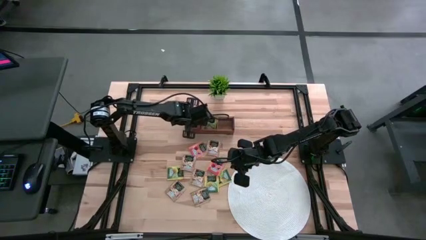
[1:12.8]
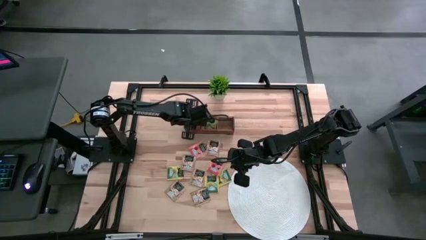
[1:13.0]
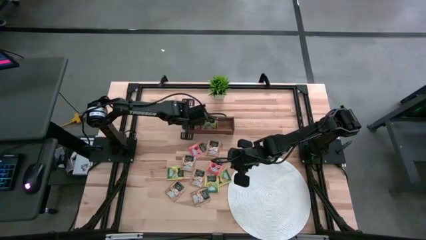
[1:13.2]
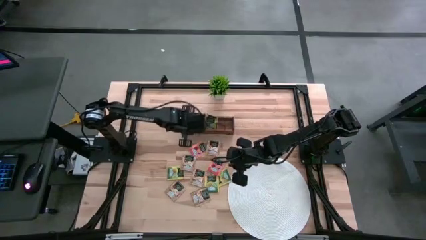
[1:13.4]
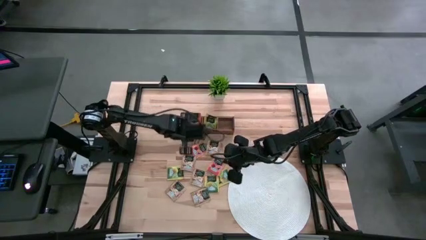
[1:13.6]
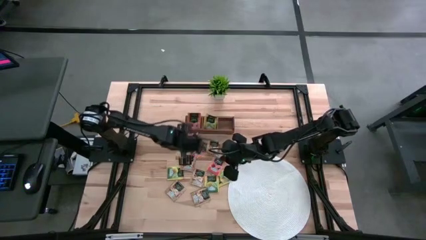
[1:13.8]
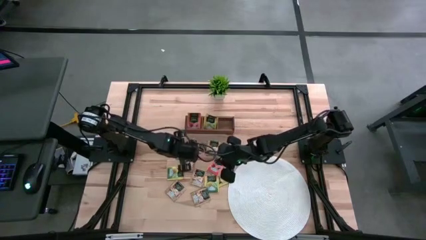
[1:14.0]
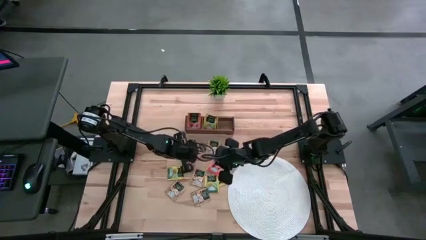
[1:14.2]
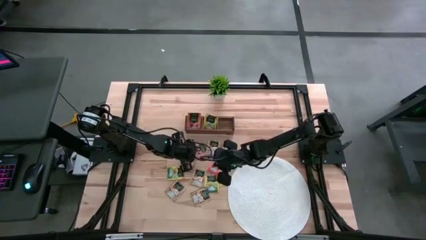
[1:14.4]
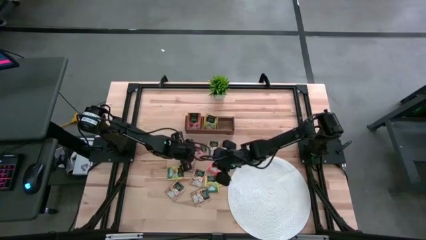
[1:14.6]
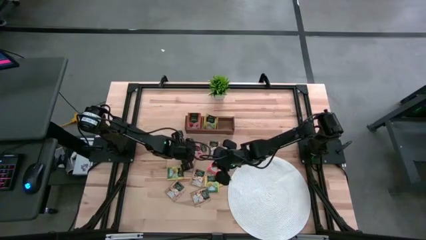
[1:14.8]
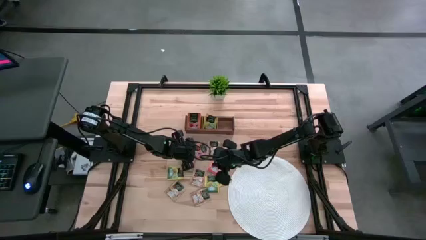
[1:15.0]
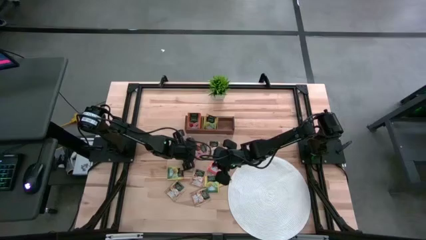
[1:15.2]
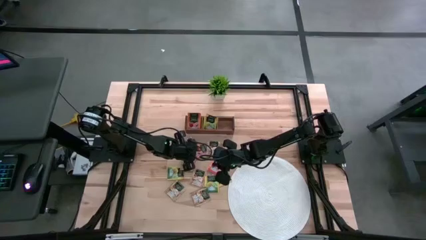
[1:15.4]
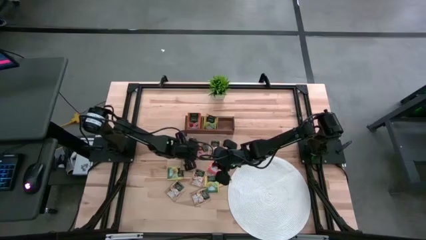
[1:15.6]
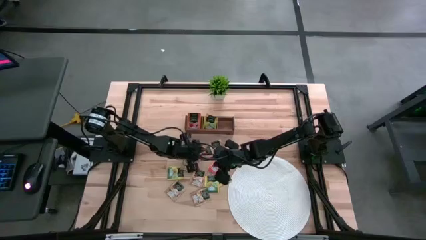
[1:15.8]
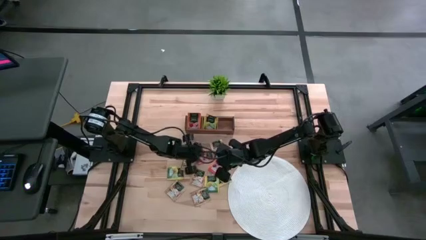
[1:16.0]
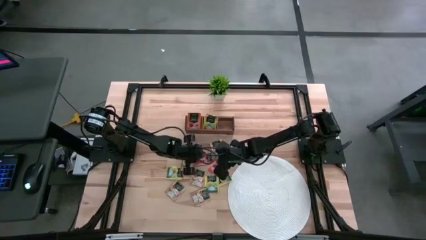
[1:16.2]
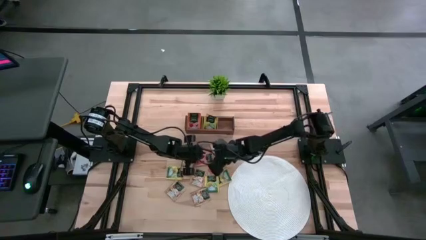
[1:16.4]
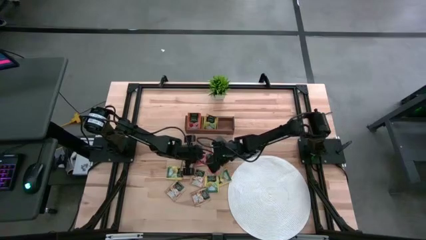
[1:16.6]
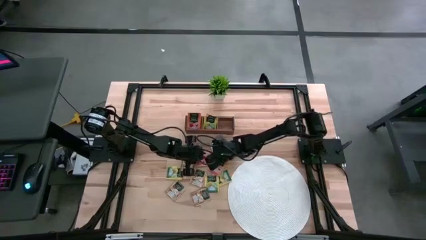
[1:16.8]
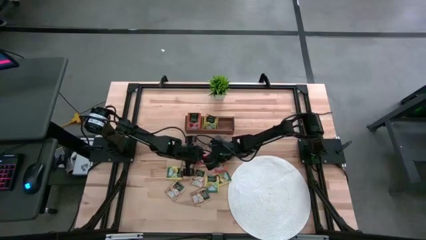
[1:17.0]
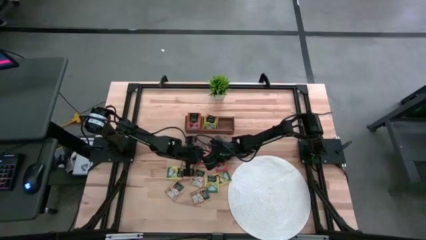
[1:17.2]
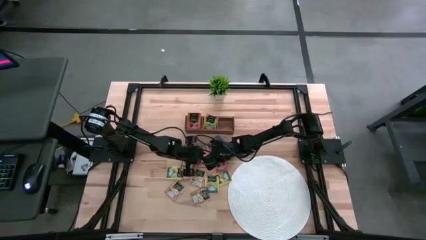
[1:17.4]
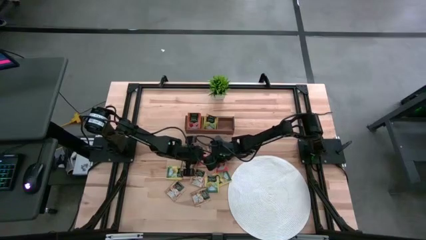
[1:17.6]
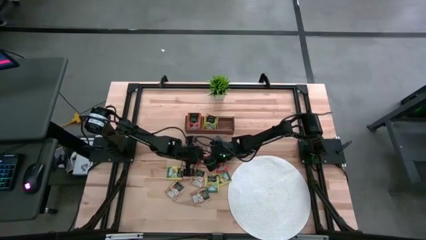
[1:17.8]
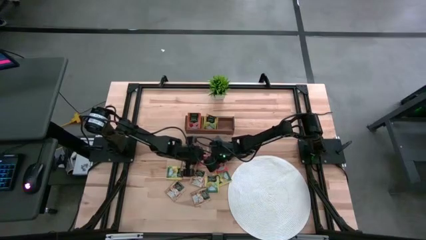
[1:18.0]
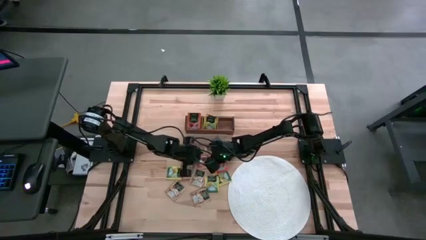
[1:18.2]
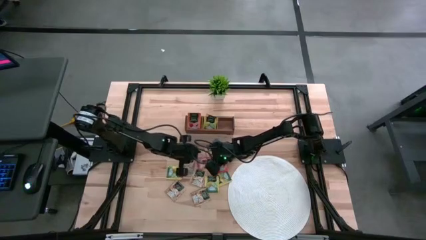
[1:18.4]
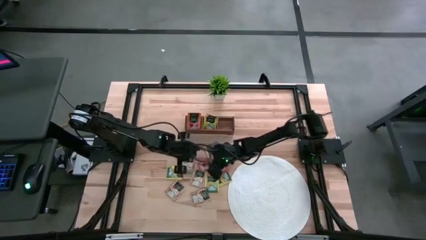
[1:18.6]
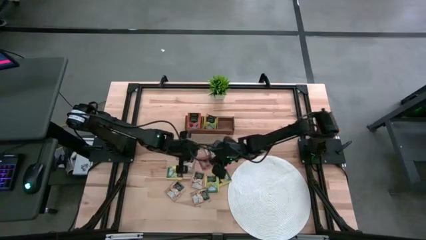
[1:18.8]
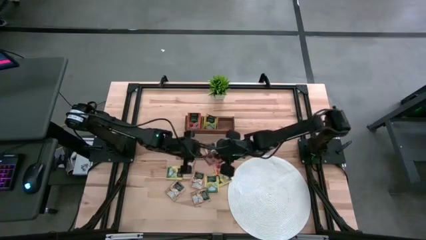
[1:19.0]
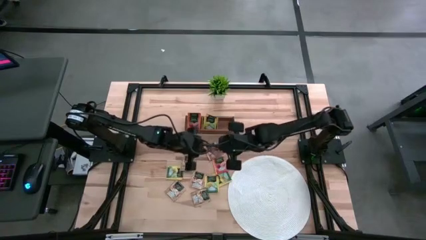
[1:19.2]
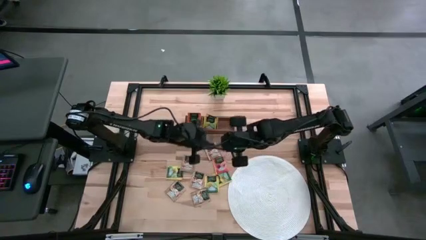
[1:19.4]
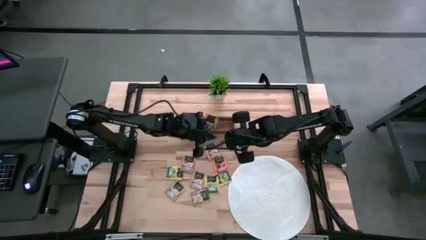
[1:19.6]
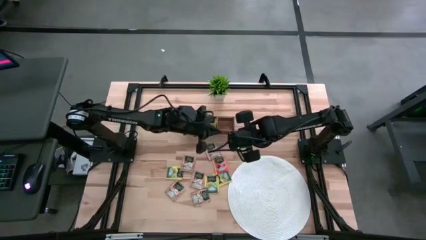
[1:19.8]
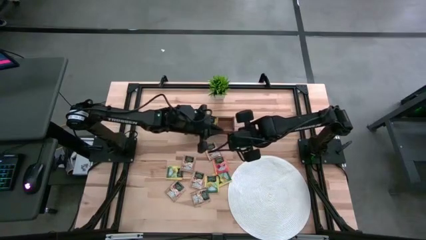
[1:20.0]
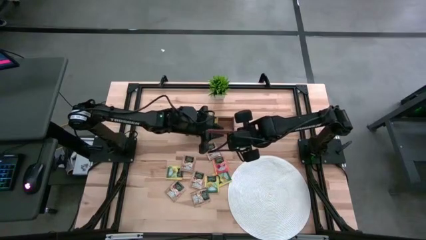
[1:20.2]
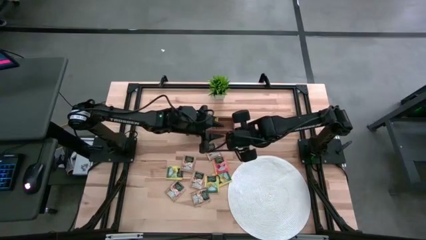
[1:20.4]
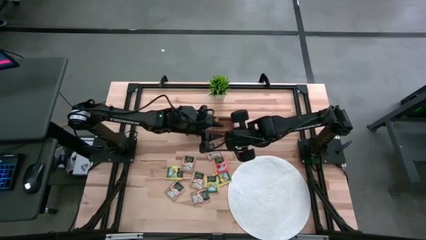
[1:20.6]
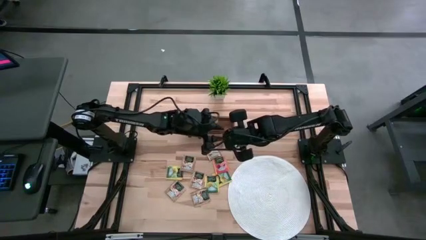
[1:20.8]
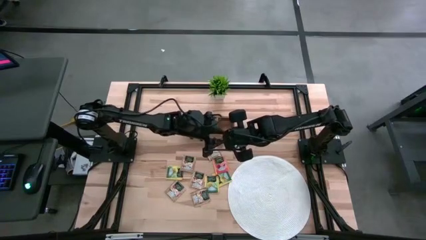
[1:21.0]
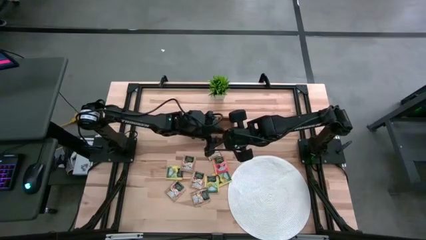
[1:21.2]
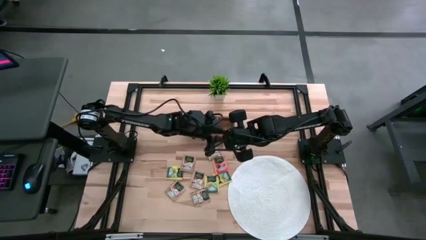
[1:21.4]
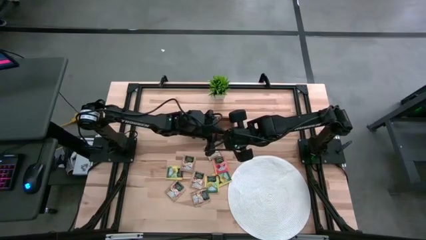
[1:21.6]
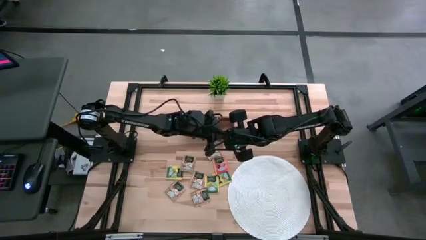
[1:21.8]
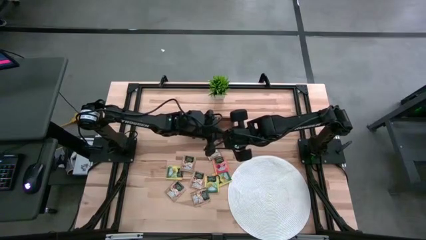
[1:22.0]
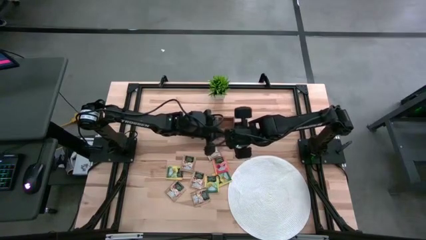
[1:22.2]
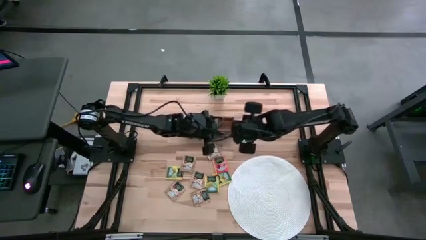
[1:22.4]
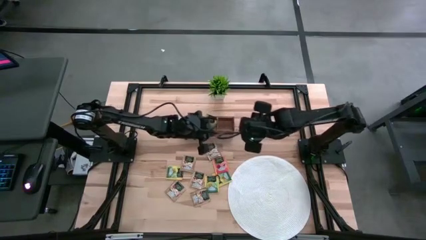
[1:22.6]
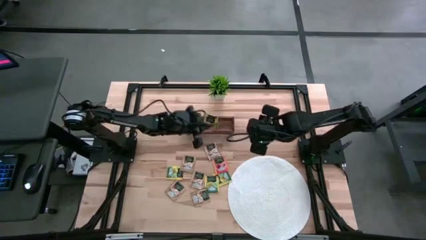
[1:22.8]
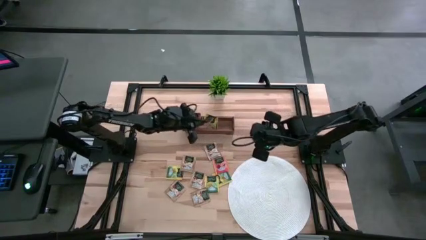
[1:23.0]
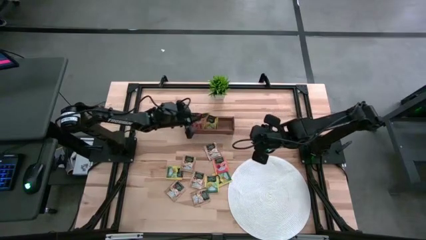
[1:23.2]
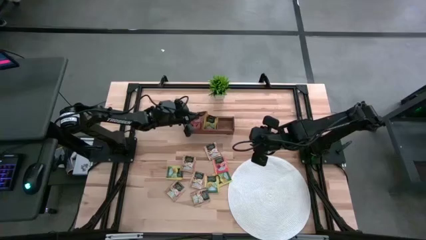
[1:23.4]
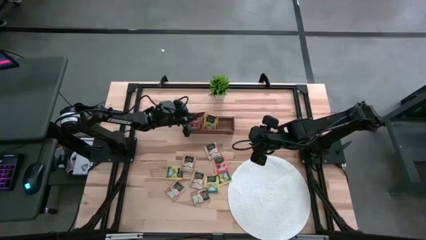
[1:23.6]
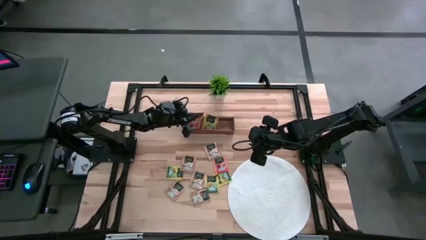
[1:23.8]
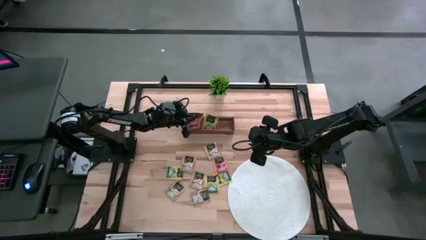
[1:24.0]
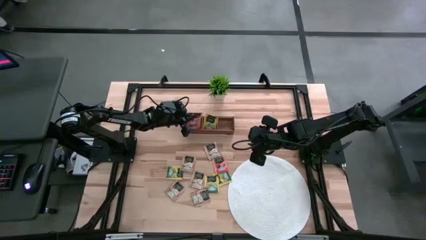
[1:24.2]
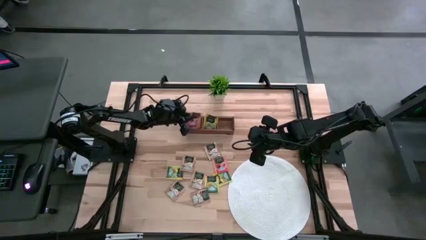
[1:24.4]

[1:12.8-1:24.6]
Task: Pick & Place Tea
Put the orange tea bag into the left section of the wooden organizer
